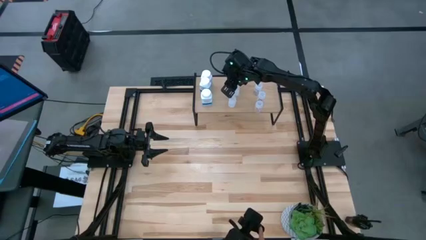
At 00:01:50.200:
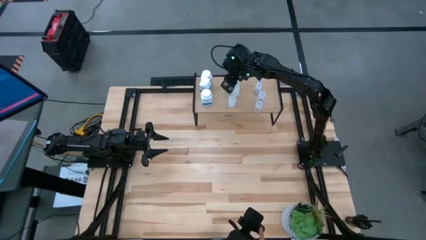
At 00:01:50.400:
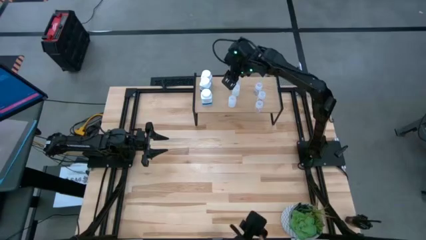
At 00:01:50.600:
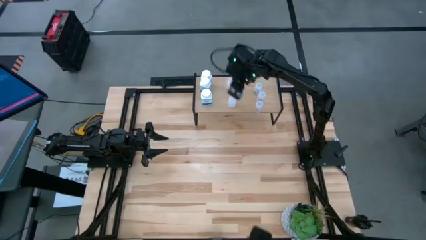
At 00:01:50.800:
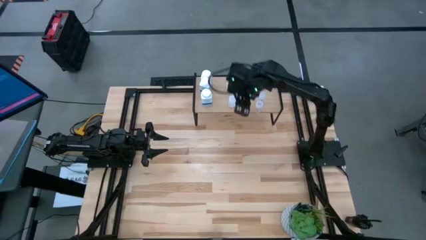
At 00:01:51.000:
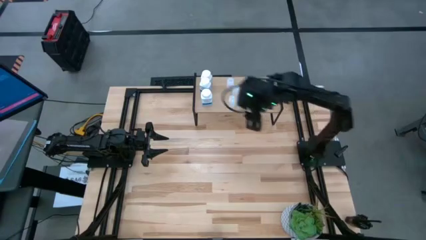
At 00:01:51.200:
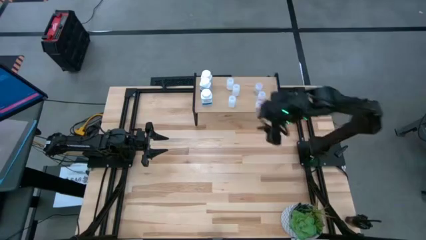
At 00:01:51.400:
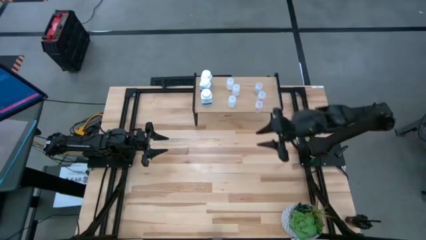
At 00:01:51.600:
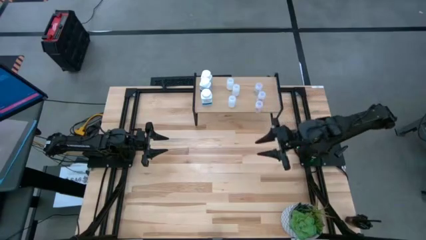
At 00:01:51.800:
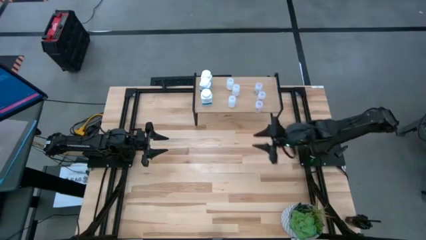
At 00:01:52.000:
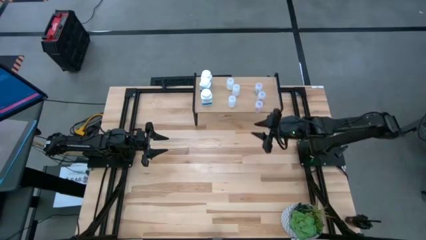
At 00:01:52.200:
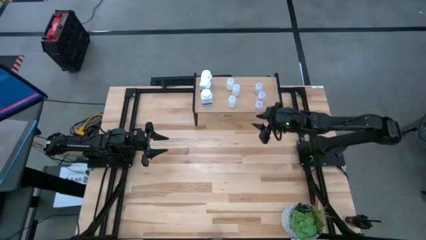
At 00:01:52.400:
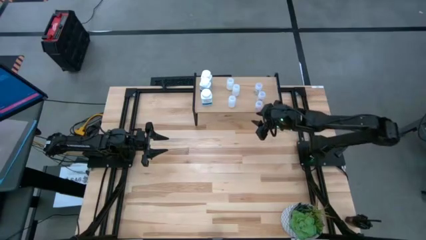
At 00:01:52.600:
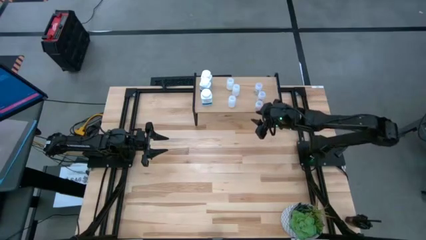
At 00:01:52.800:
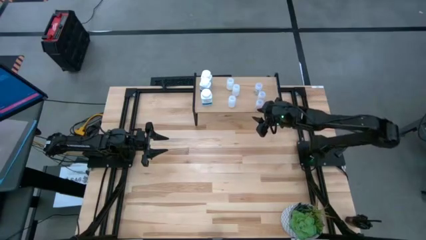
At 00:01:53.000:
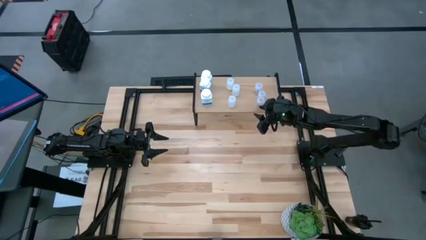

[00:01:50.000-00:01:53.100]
Task: Pick and place medicine bottles onto shelf by color
Adjust the transparent pill bottle on the shelf

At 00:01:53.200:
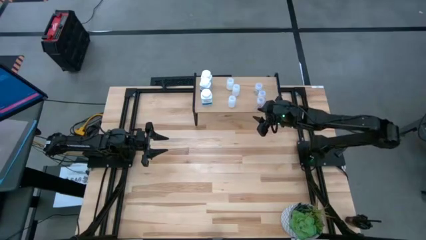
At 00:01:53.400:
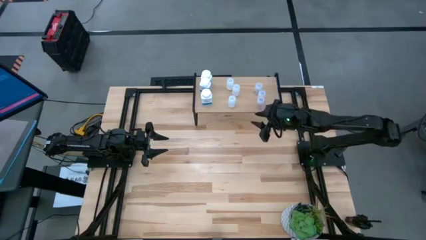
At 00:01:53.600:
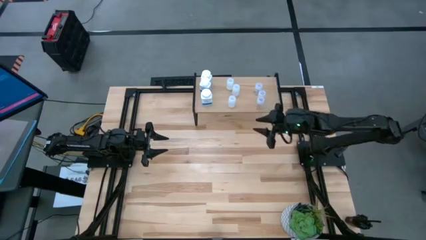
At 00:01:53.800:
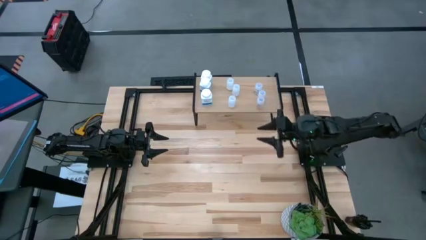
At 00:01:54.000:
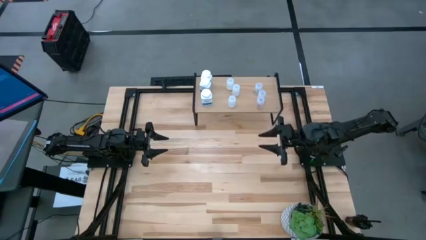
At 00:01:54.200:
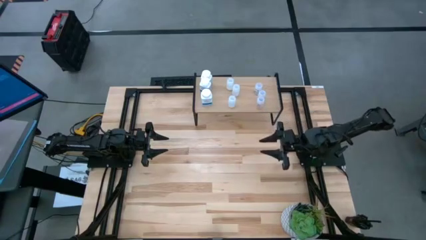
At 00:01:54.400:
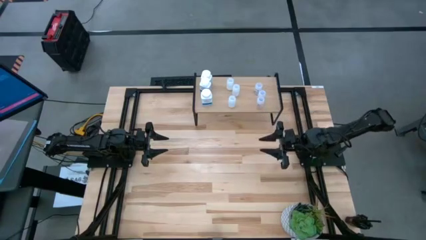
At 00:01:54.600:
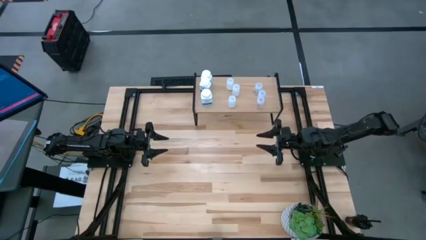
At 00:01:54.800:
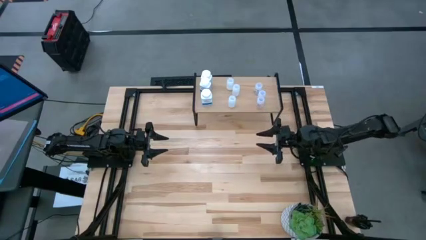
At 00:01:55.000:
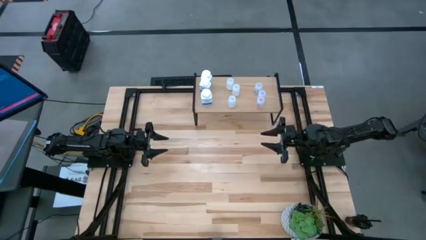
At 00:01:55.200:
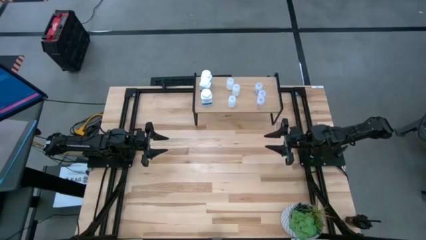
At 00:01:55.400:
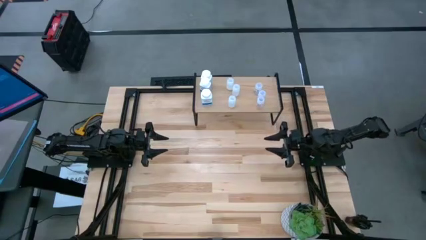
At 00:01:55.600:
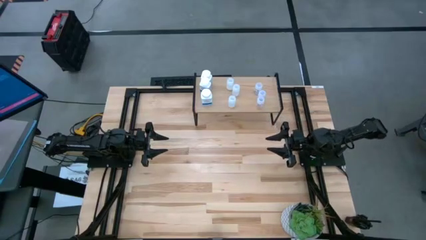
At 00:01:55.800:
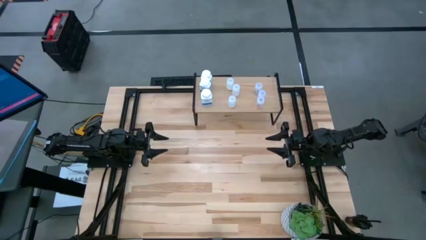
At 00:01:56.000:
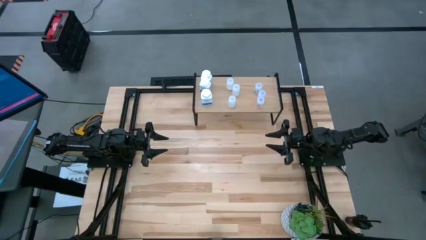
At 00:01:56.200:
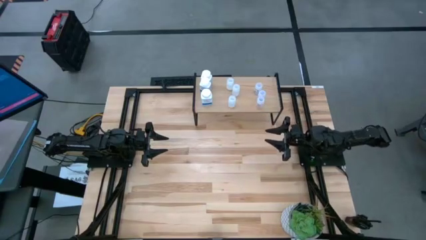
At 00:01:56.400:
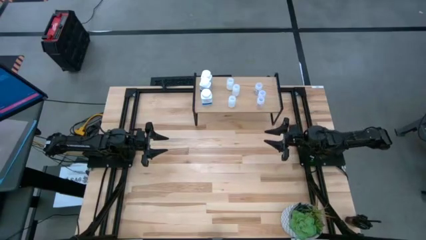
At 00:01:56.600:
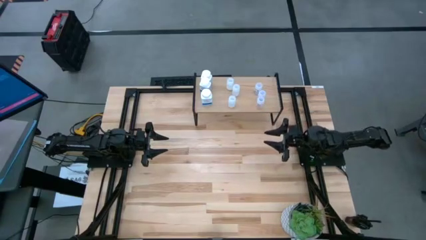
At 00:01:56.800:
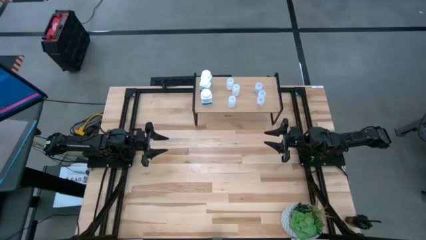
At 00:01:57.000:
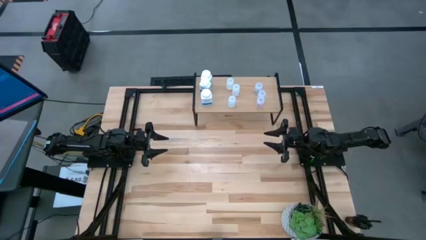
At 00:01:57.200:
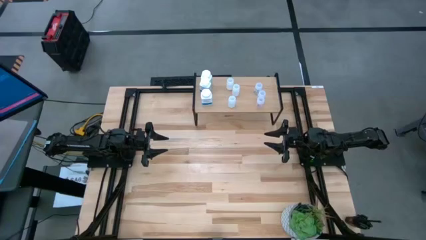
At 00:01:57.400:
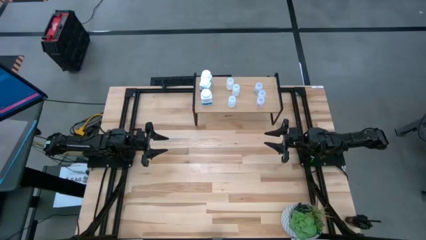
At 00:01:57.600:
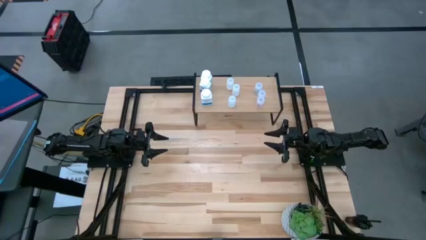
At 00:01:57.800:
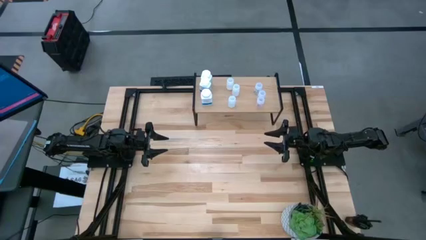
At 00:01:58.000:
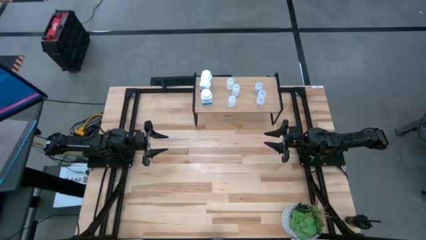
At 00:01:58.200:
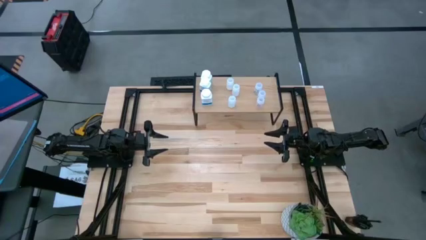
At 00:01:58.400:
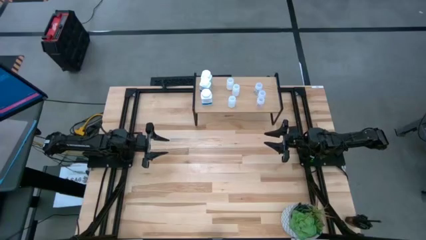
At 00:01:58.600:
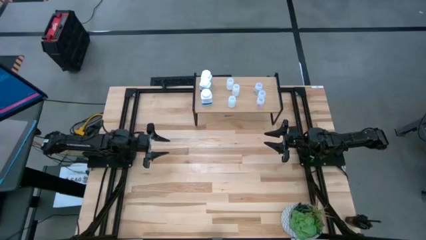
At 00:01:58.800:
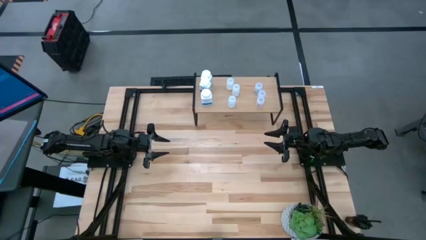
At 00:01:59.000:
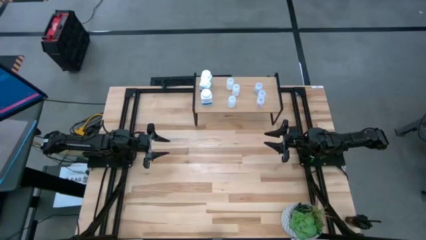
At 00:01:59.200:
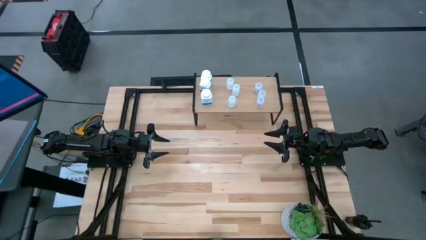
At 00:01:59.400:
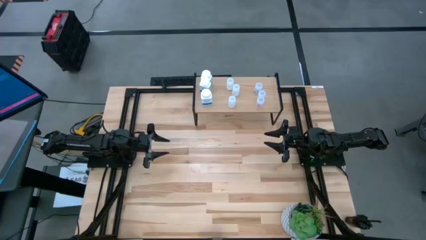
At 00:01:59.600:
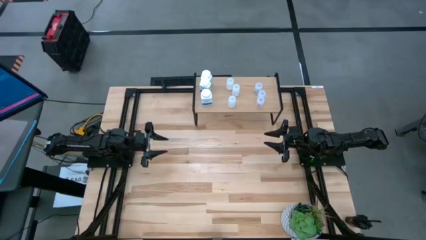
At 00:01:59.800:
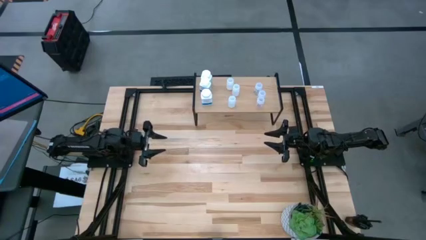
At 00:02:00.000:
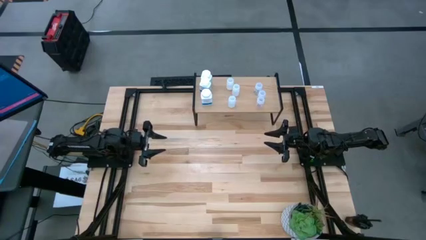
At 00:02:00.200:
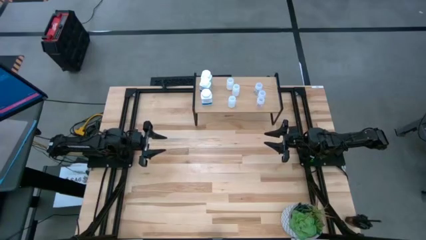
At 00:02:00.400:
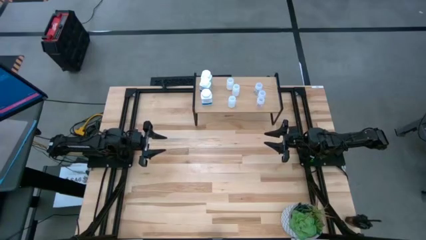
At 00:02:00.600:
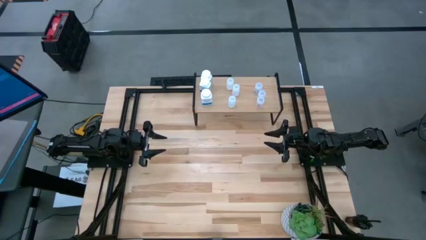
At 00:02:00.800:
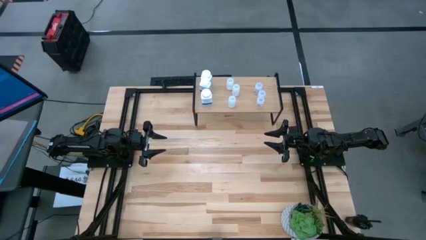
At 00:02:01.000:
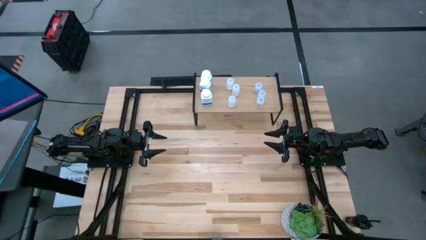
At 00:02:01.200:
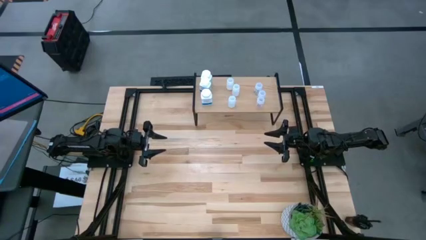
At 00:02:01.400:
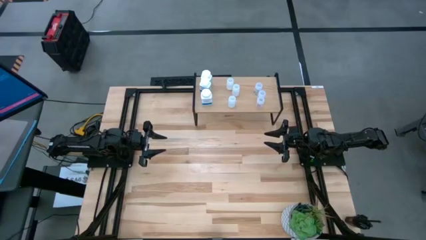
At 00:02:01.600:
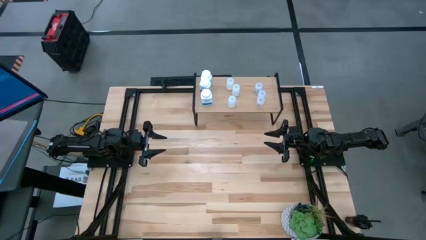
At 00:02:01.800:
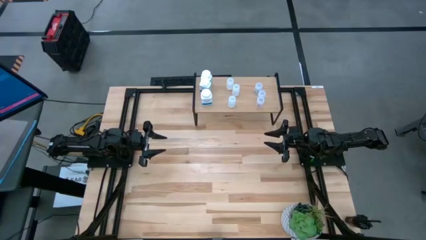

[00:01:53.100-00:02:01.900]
Return to Home Position

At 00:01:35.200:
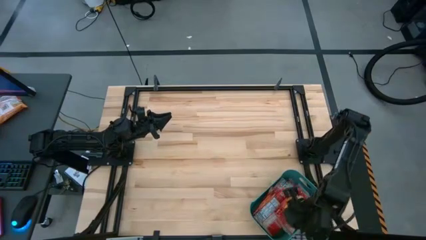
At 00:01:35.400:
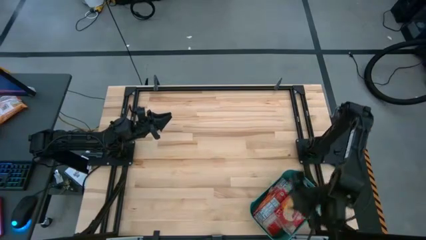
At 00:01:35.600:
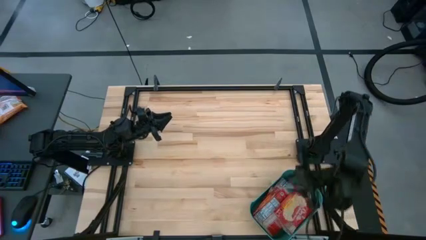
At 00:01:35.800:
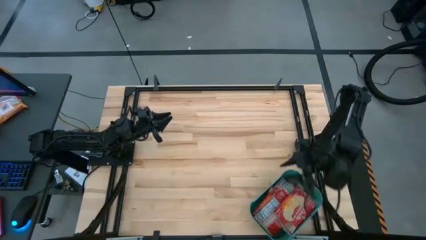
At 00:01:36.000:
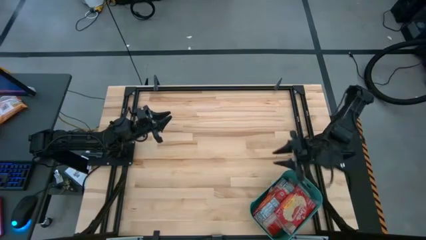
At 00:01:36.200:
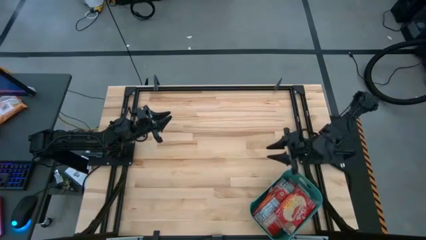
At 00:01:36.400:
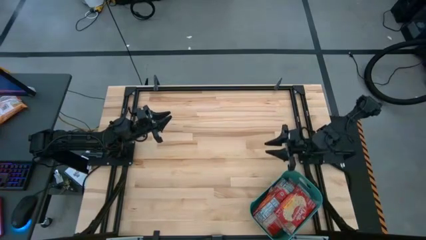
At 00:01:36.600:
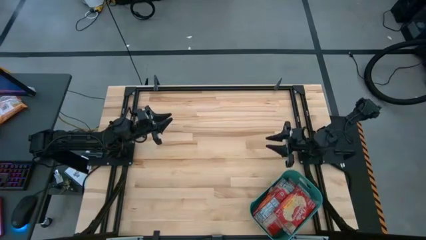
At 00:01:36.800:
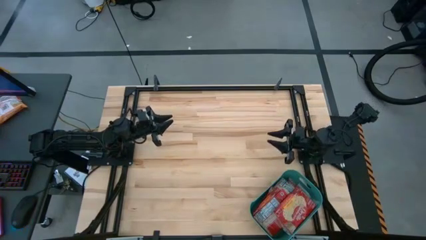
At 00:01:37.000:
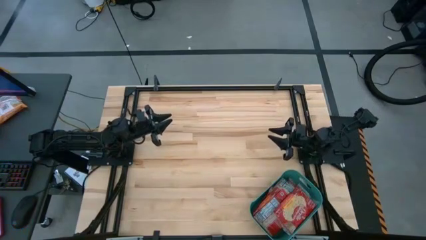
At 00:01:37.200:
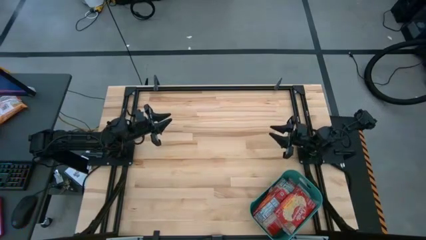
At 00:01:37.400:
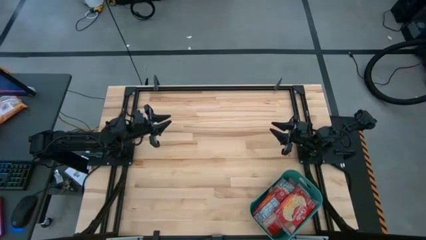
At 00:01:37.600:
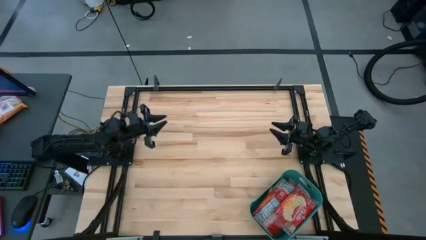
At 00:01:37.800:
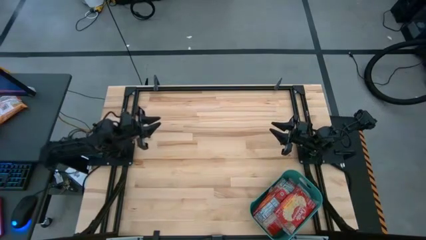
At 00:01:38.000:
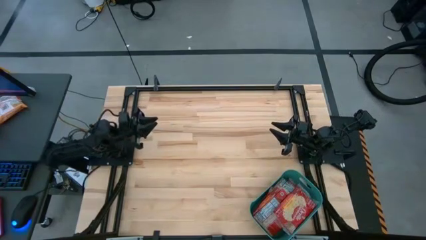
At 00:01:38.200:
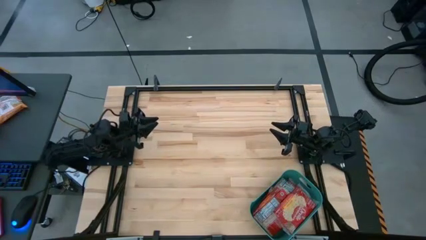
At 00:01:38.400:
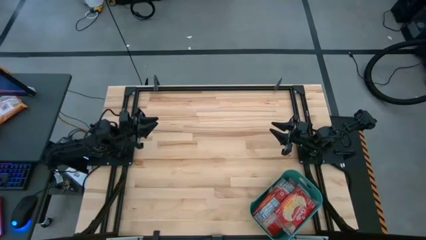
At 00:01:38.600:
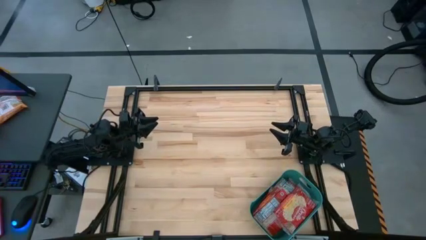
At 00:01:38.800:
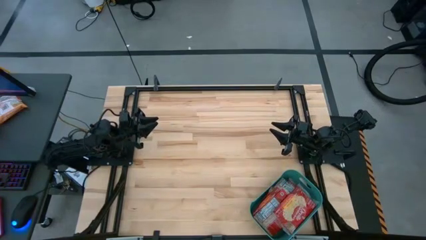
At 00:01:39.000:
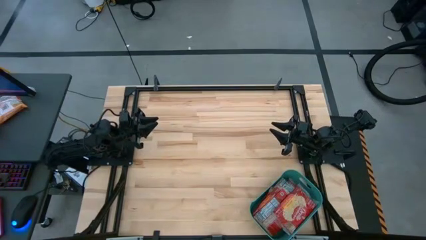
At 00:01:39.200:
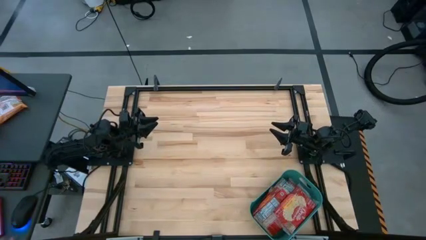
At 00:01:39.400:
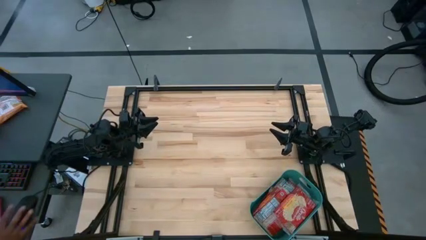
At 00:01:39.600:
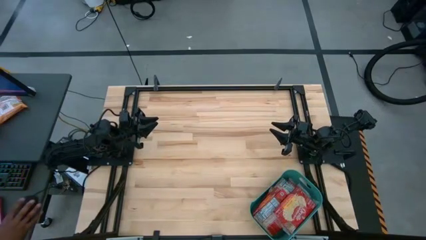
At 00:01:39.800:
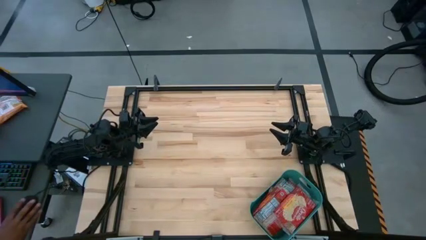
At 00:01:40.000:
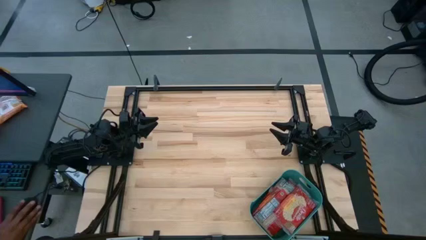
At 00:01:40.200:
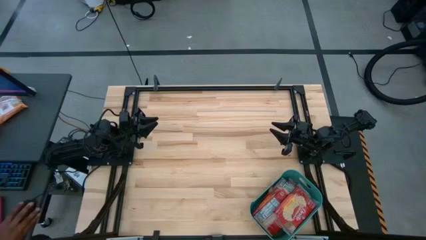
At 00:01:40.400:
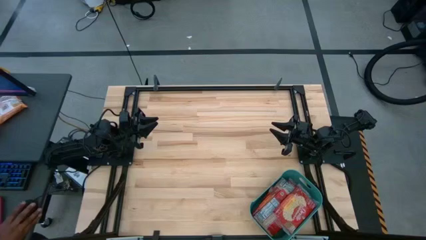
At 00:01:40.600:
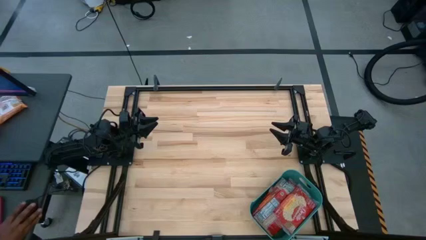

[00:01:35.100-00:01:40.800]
Task: Sort popcorn bags into baskets
Return to Home Position
